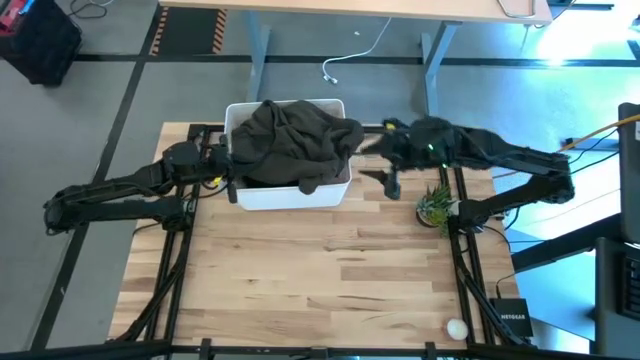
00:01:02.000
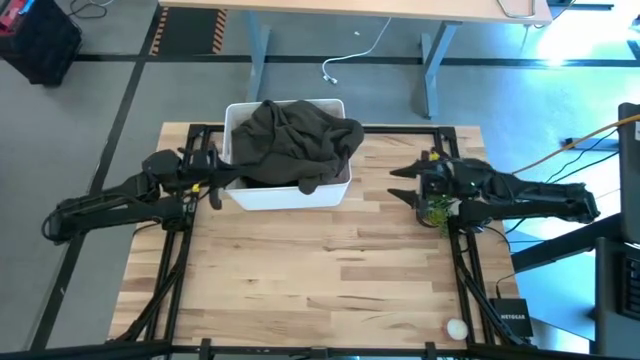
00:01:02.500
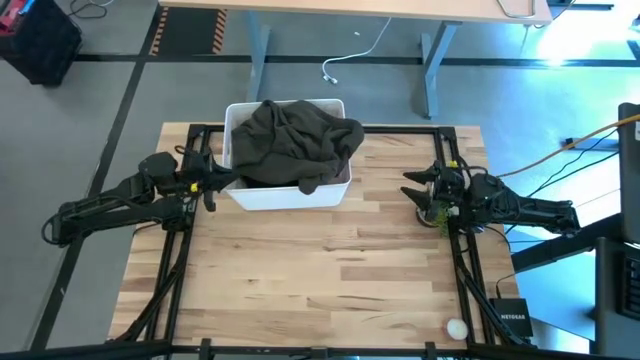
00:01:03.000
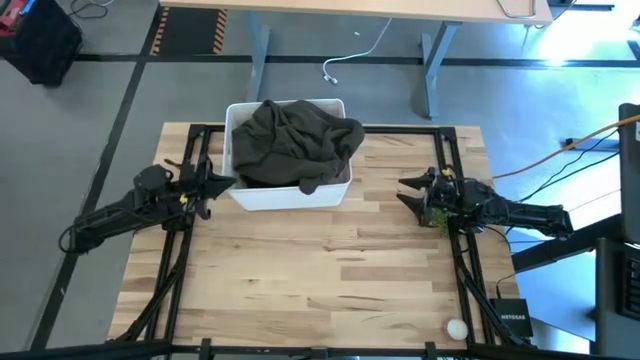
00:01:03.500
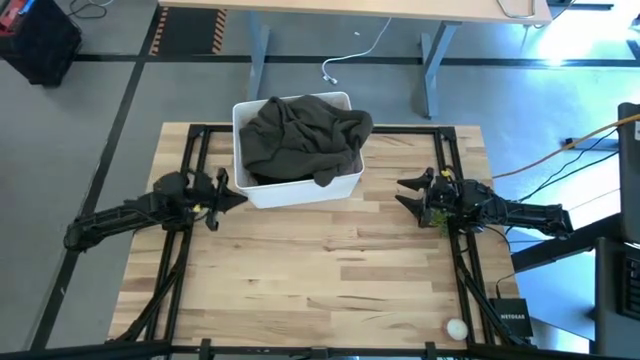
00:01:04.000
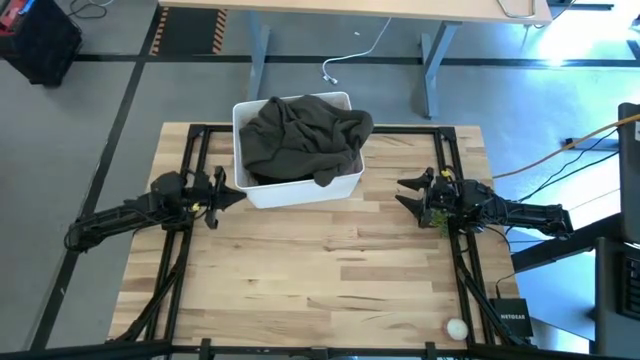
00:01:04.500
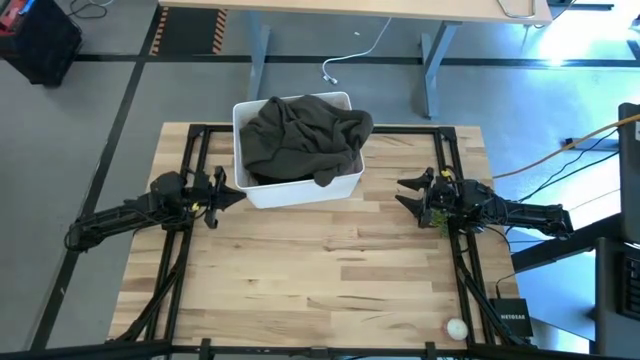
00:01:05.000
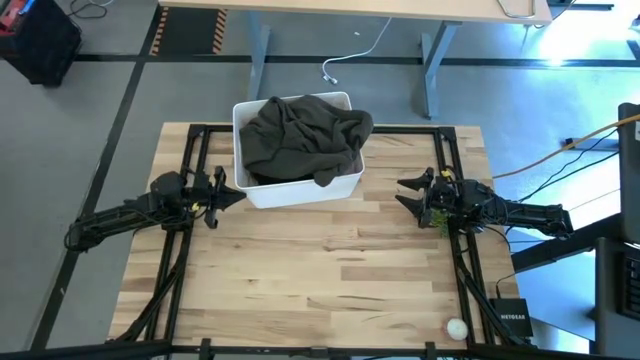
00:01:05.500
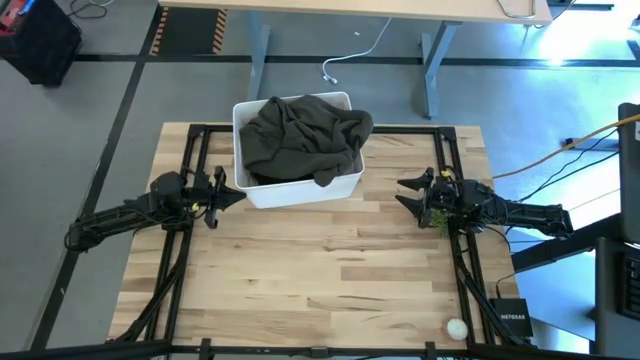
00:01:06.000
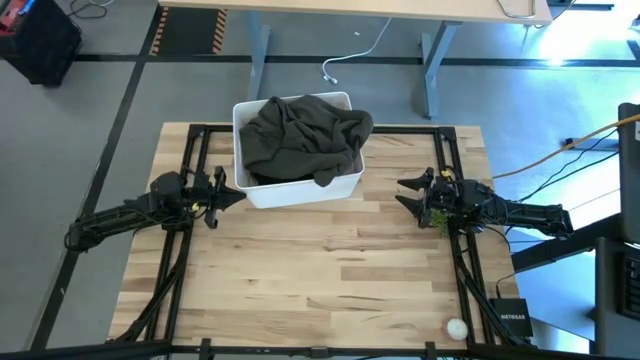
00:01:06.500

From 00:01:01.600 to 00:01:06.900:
Task: Sort clothes
Return to Home Position

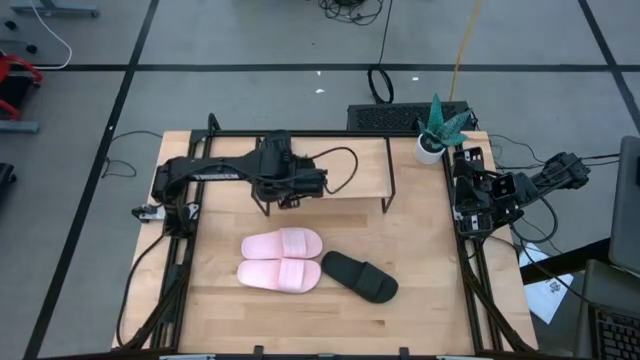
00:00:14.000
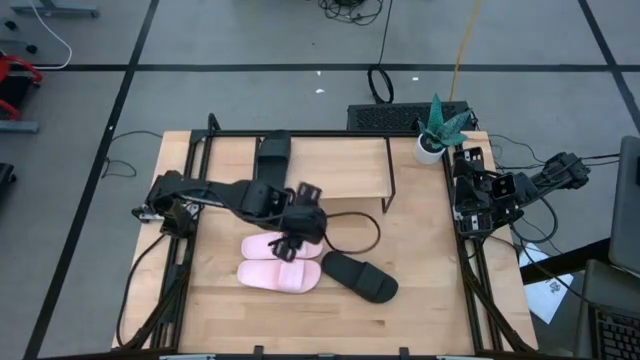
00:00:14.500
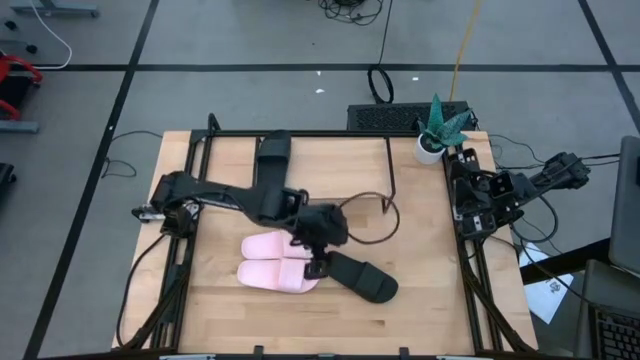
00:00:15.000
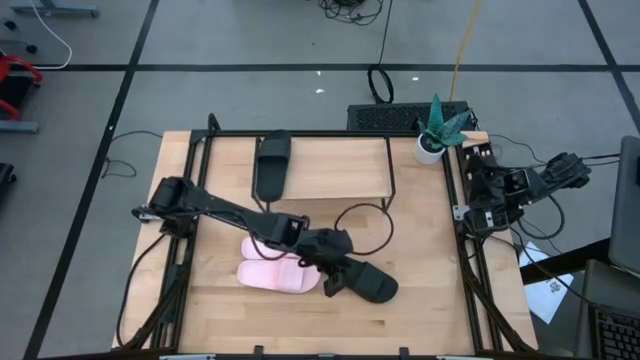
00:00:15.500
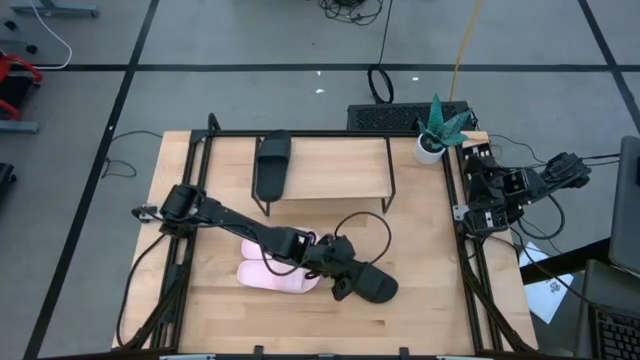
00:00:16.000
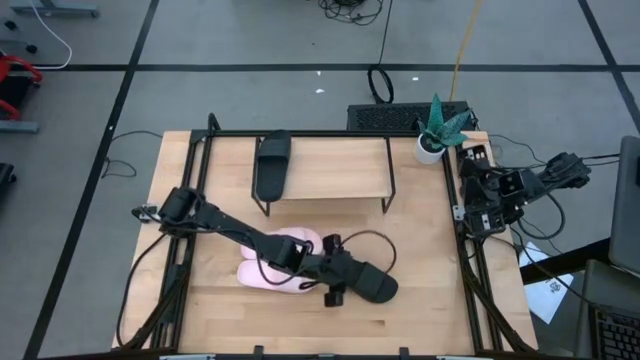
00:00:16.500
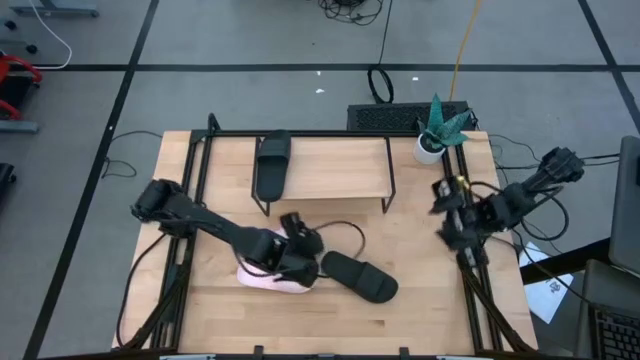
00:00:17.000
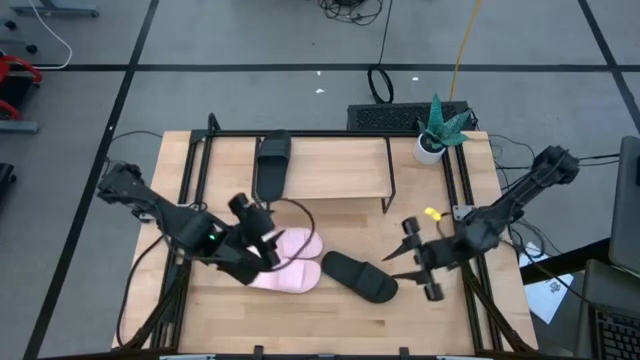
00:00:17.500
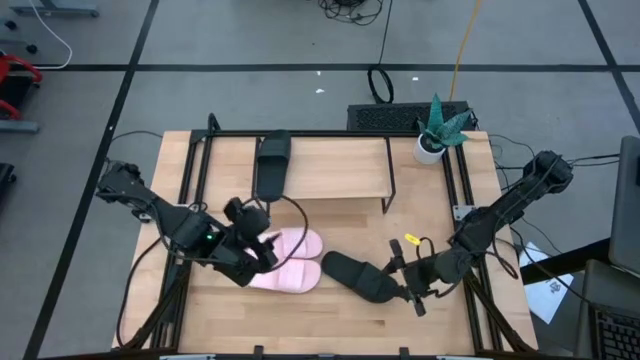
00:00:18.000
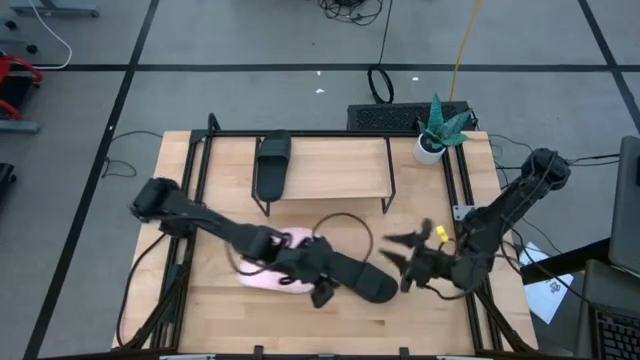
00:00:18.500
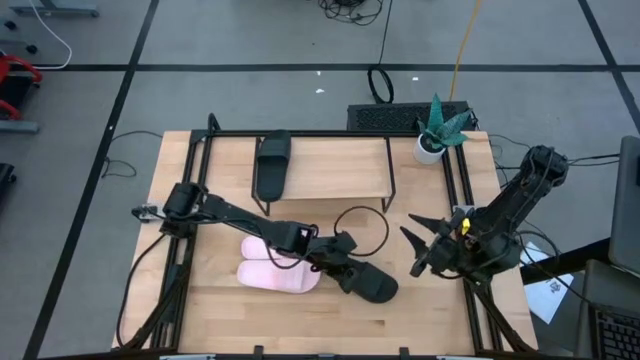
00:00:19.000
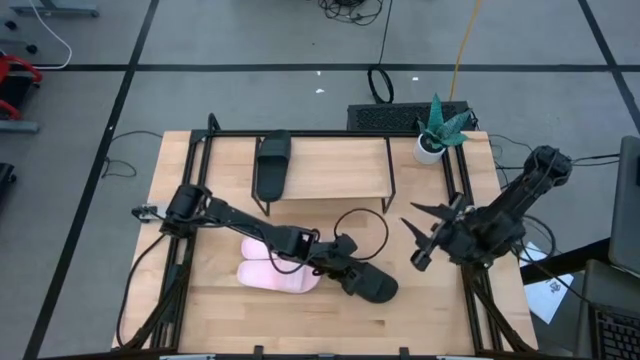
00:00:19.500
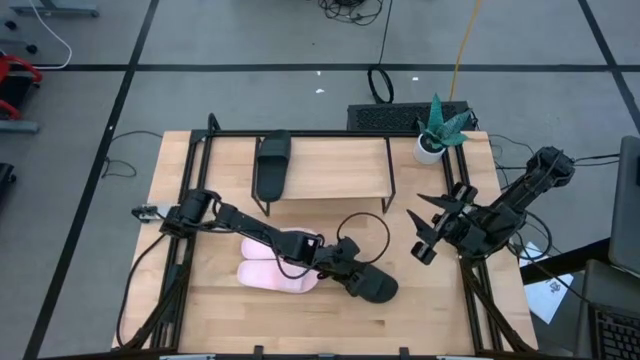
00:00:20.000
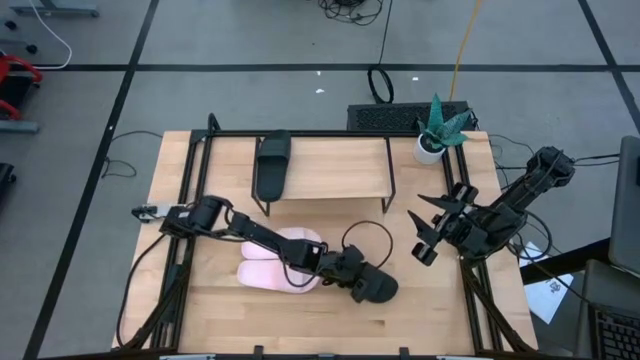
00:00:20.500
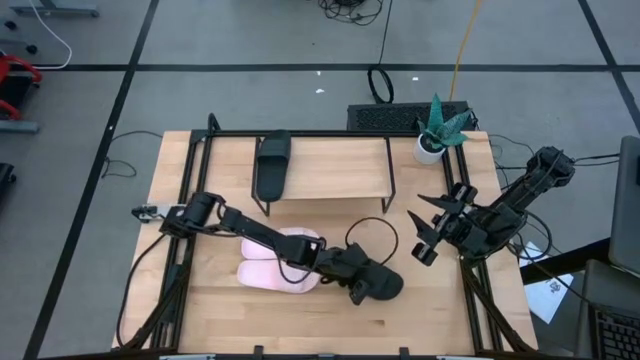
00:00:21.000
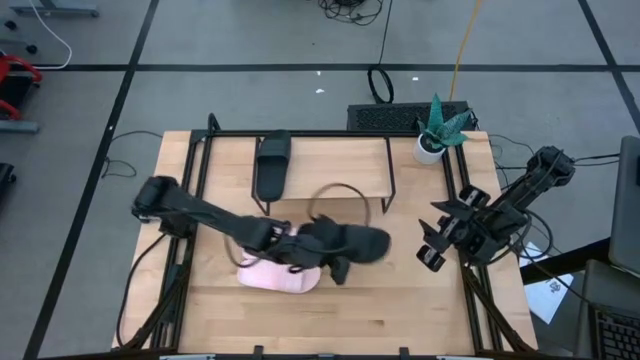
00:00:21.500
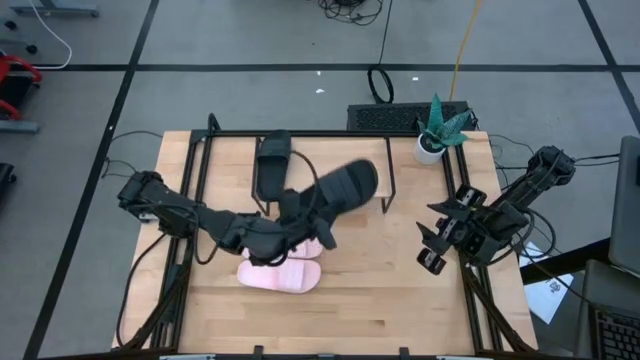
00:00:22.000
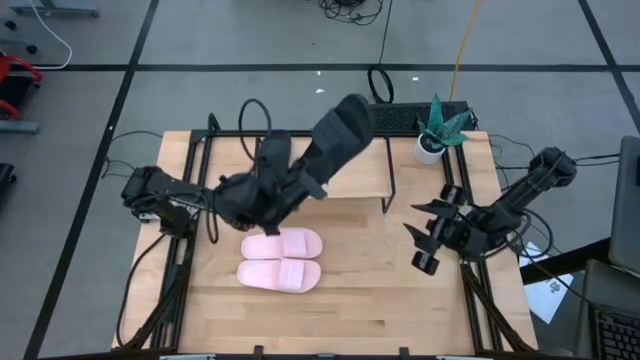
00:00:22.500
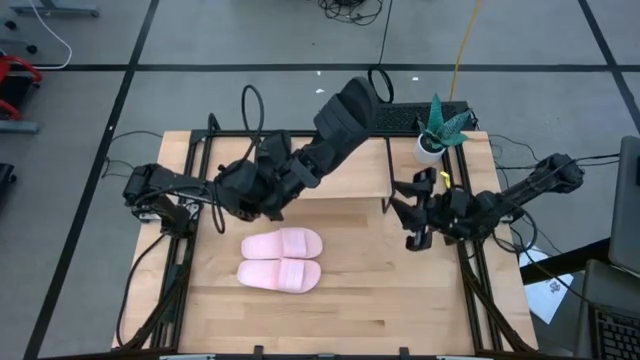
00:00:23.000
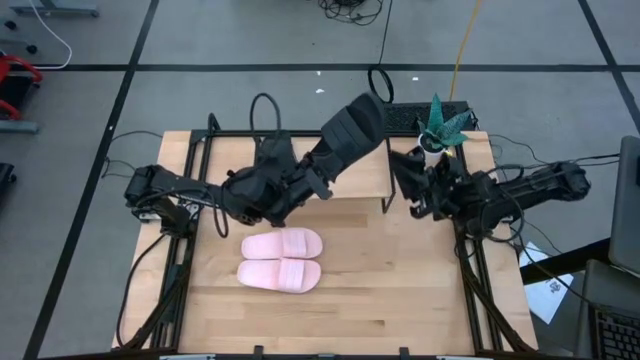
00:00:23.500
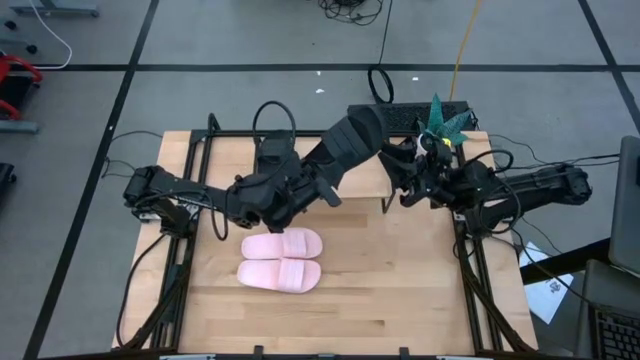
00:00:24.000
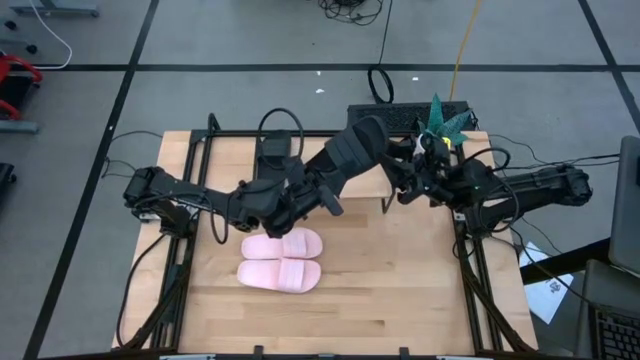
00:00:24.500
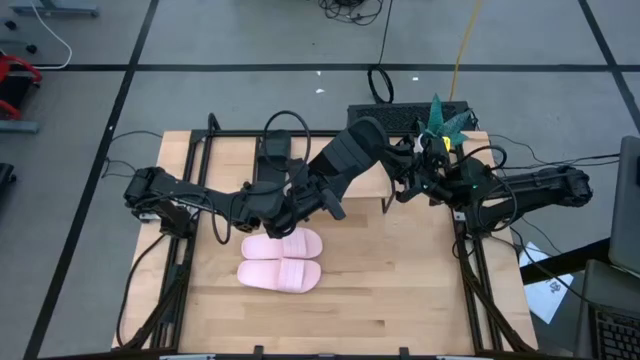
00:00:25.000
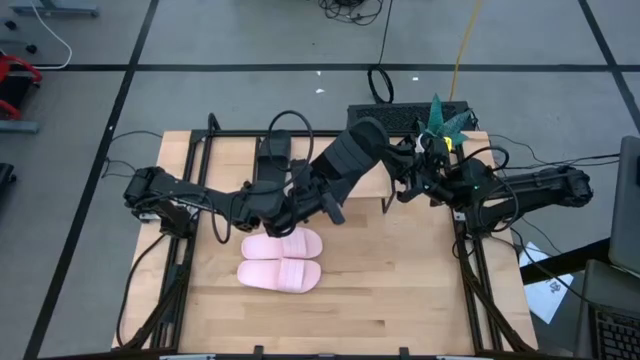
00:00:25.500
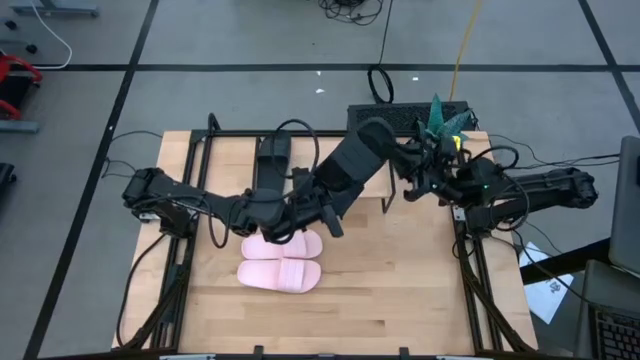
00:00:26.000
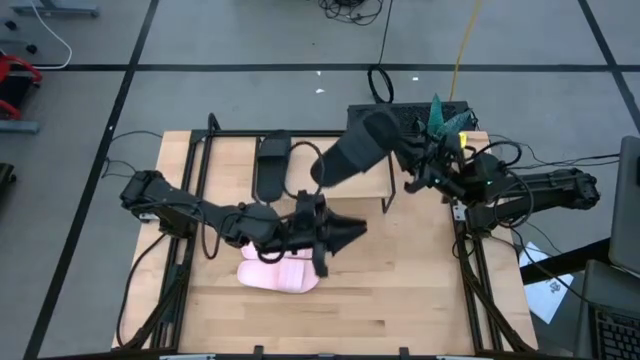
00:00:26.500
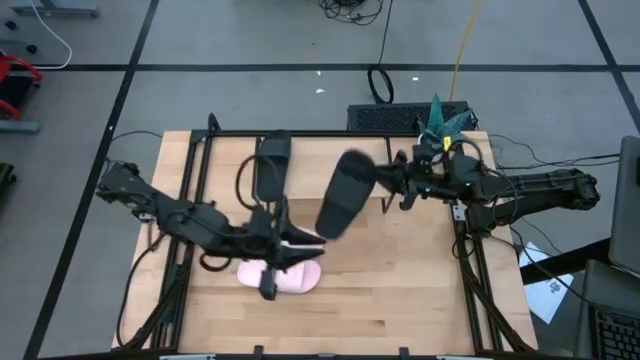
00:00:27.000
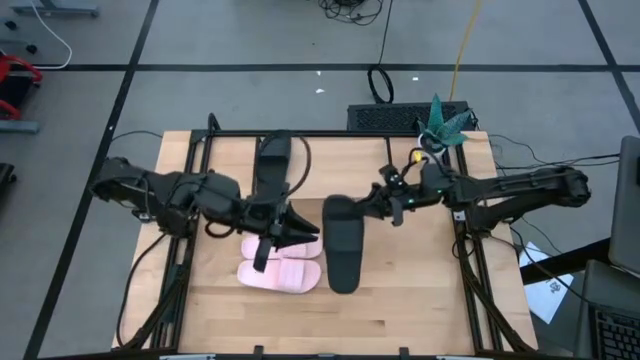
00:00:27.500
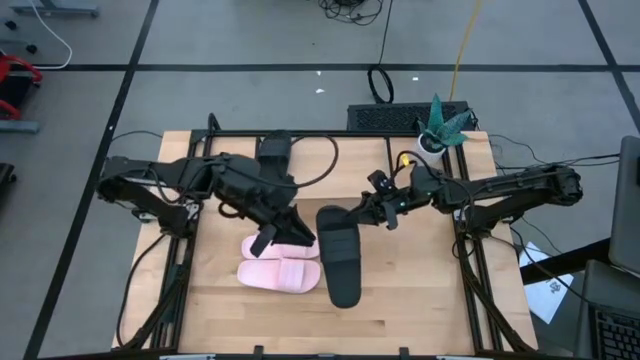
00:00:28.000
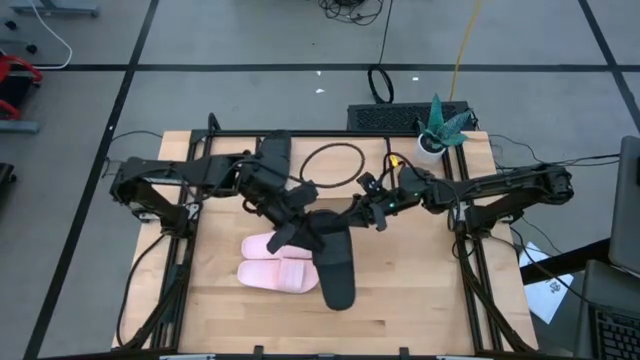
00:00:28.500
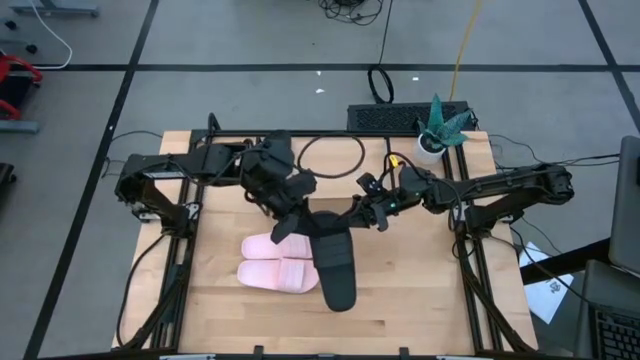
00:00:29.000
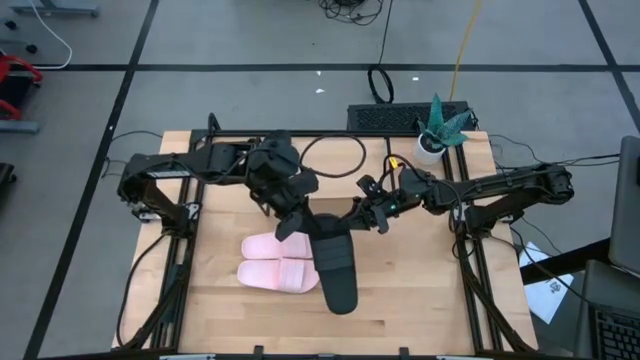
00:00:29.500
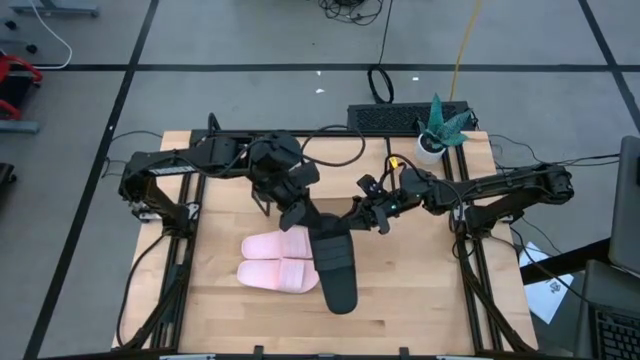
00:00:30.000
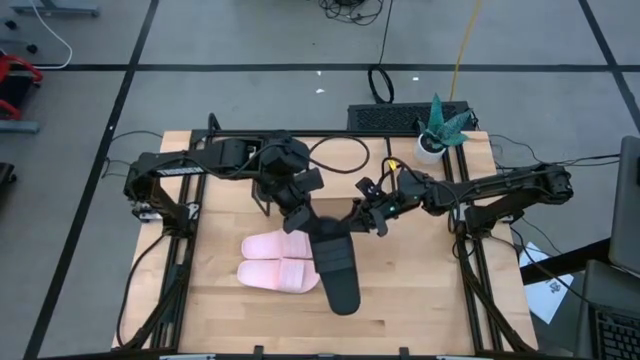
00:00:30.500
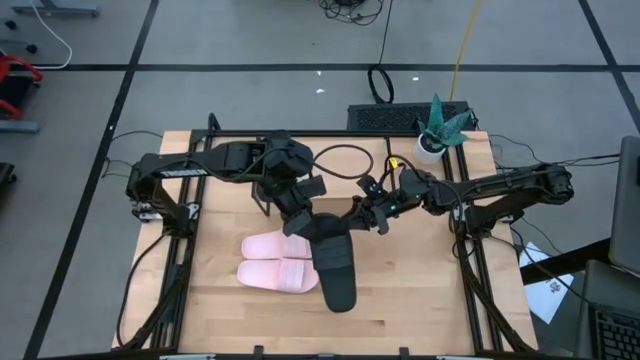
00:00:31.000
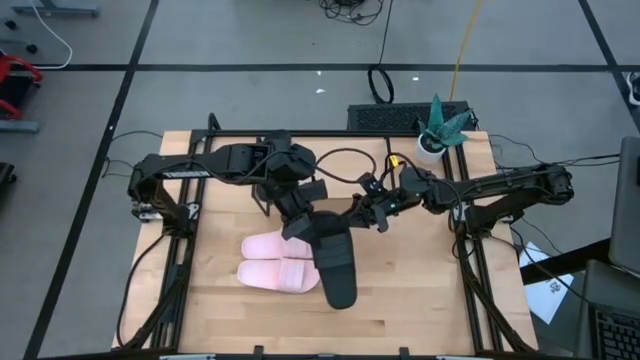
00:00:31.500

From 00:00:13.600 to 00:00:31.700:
Task: Pick and place slides into the shelf
Put the black slide on the shelf
